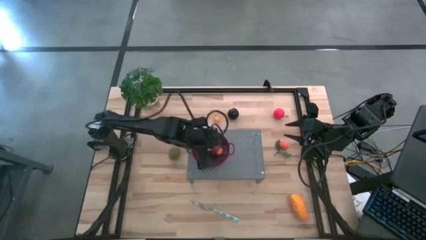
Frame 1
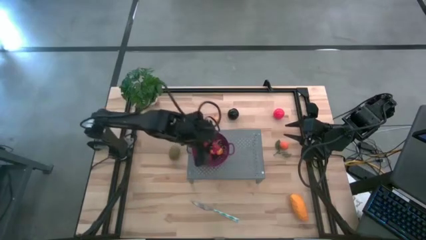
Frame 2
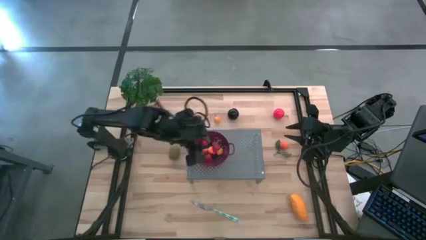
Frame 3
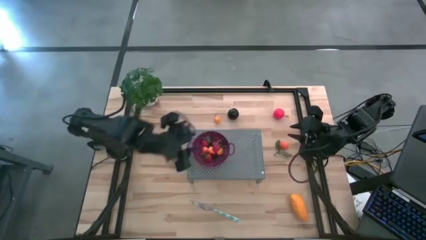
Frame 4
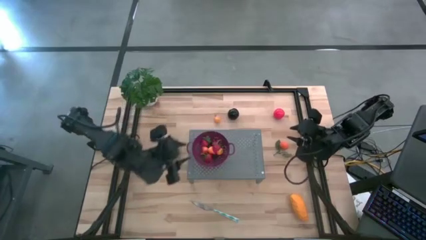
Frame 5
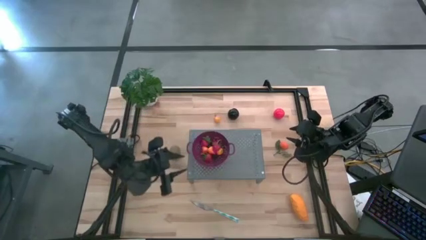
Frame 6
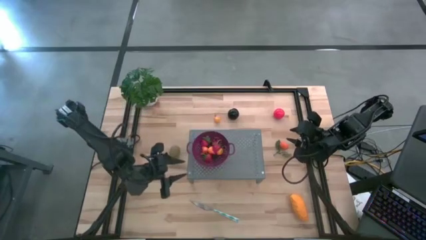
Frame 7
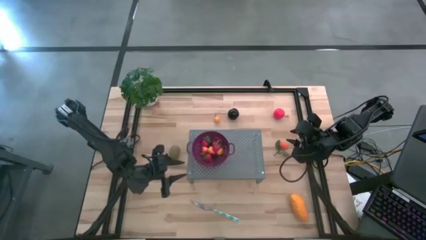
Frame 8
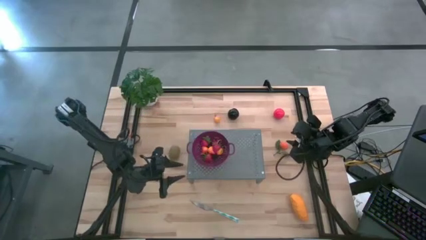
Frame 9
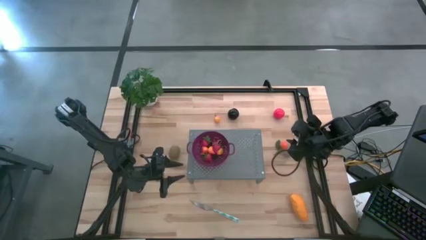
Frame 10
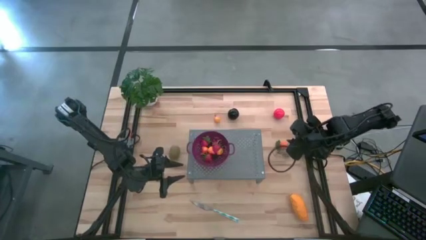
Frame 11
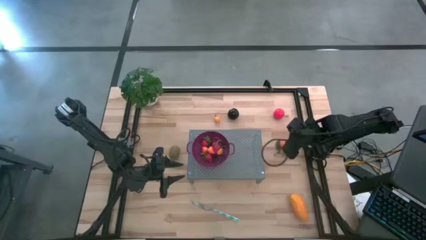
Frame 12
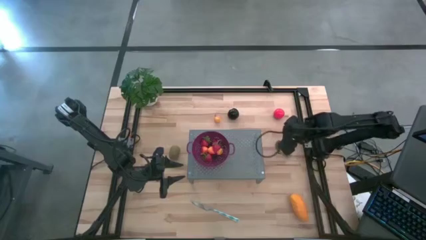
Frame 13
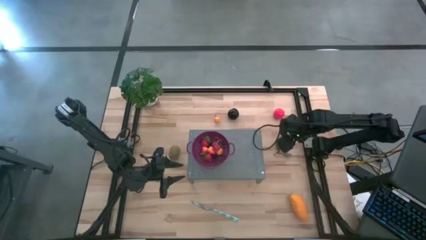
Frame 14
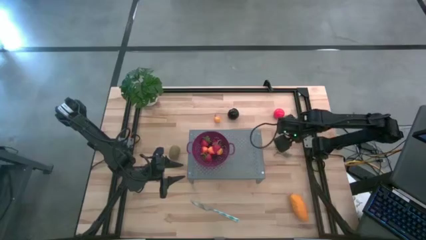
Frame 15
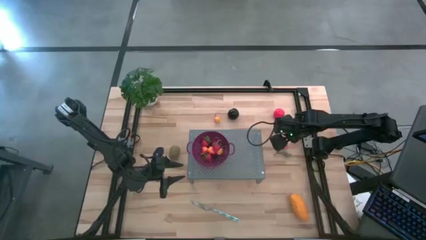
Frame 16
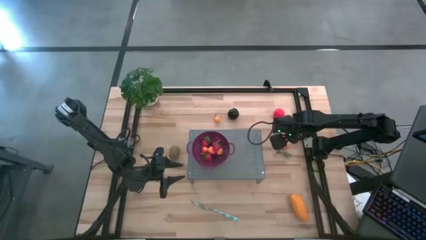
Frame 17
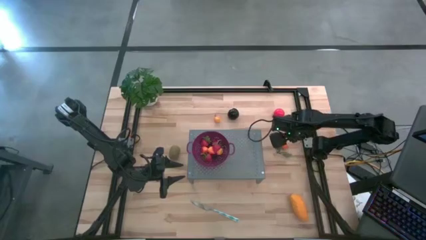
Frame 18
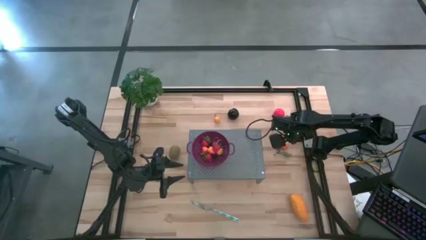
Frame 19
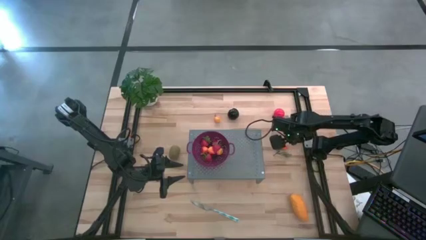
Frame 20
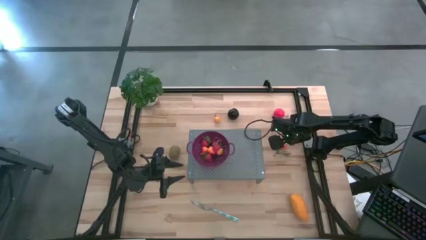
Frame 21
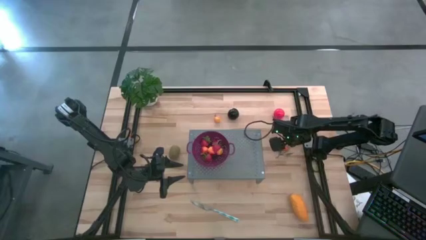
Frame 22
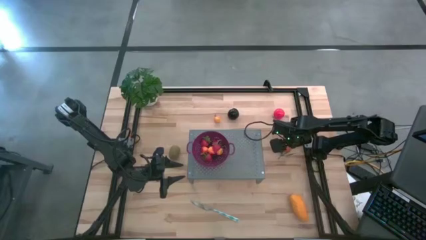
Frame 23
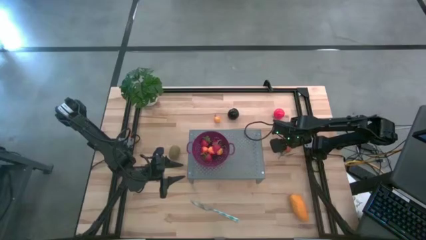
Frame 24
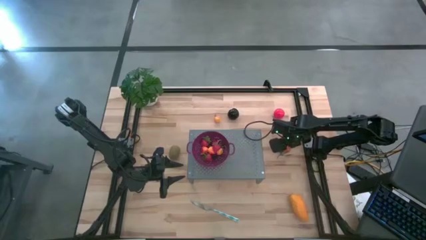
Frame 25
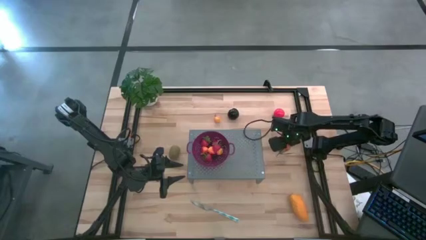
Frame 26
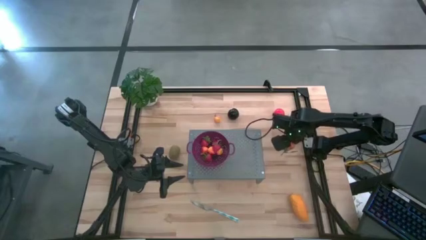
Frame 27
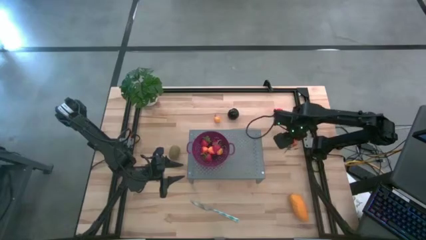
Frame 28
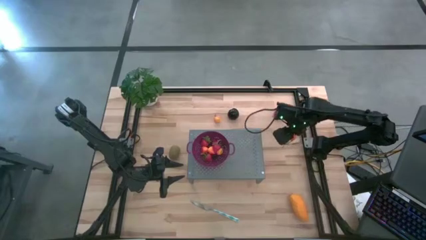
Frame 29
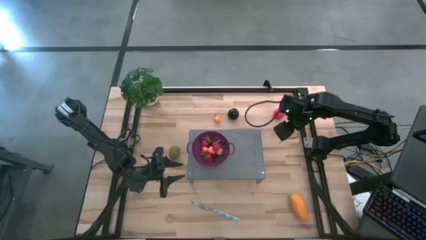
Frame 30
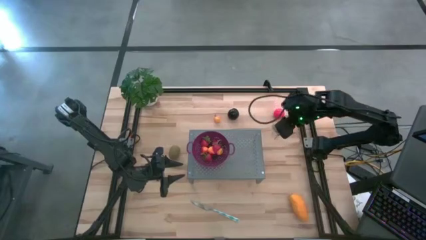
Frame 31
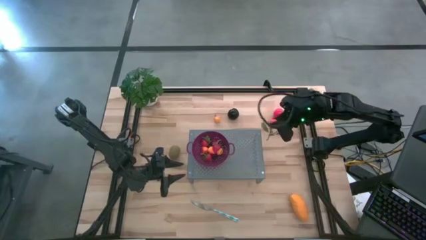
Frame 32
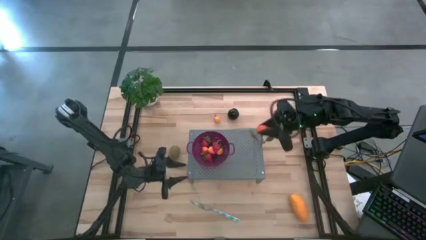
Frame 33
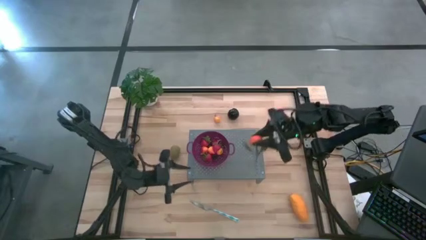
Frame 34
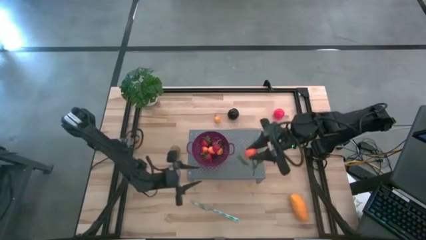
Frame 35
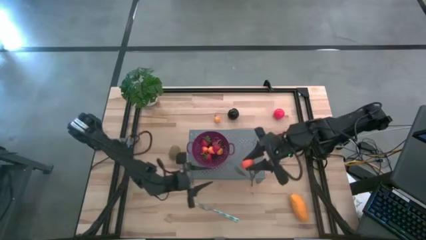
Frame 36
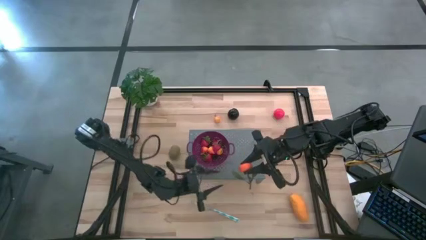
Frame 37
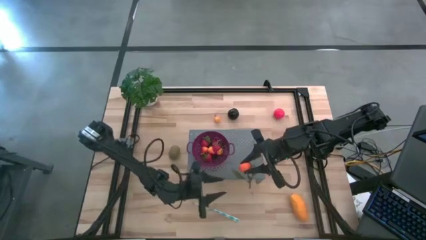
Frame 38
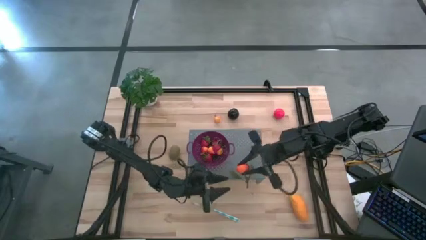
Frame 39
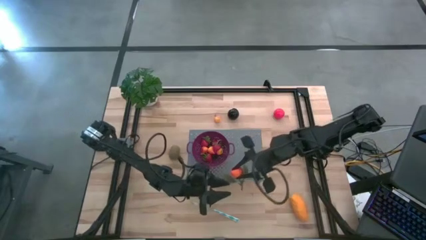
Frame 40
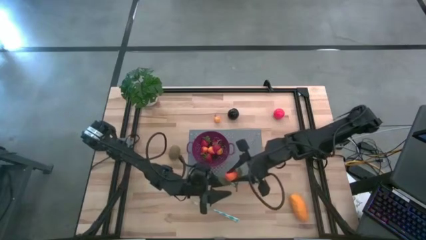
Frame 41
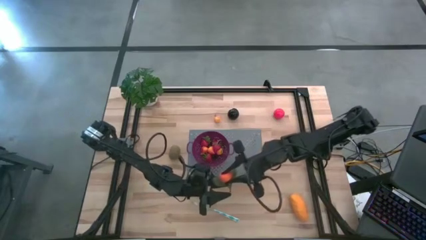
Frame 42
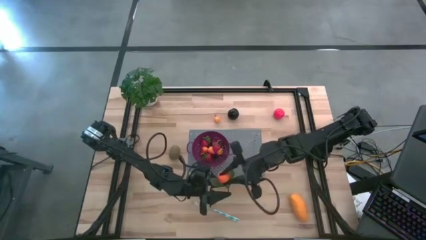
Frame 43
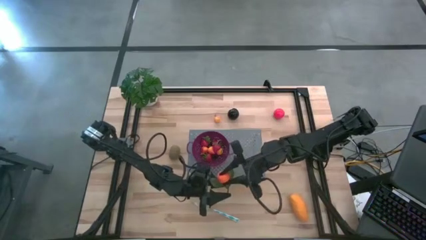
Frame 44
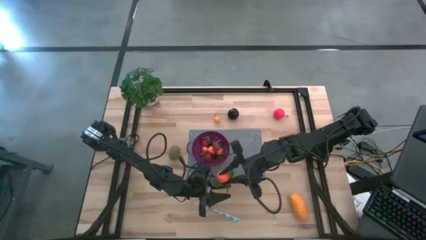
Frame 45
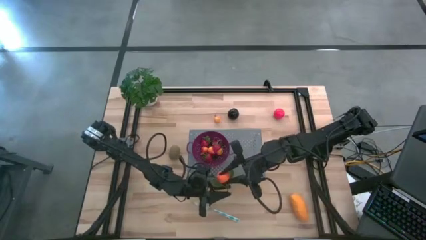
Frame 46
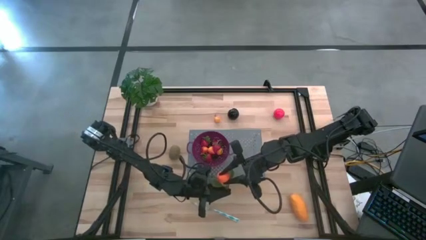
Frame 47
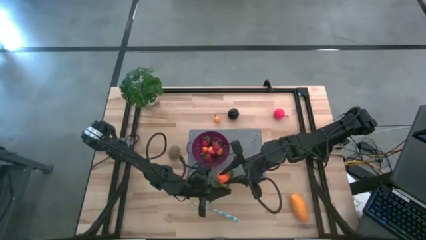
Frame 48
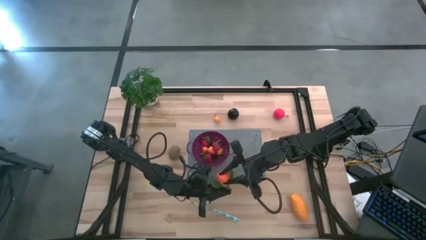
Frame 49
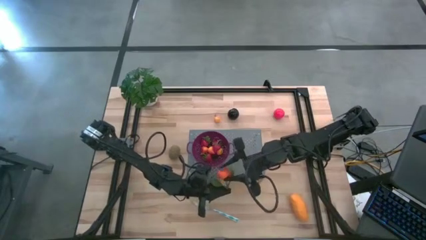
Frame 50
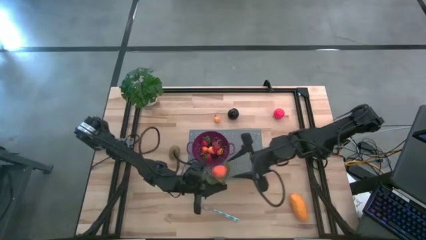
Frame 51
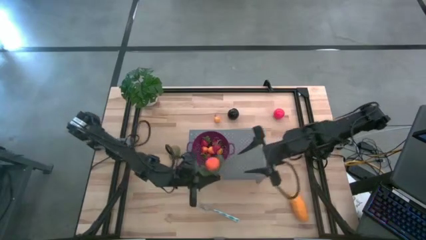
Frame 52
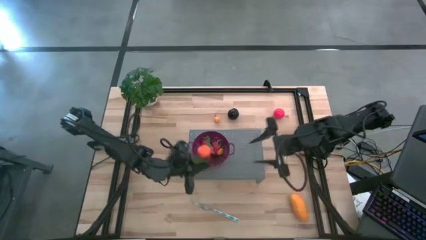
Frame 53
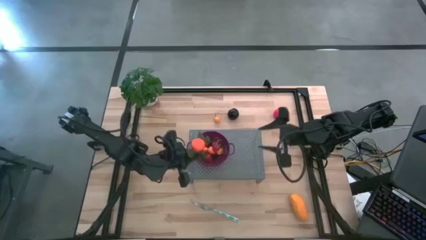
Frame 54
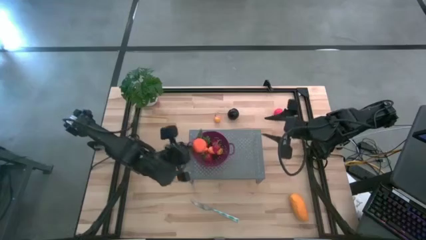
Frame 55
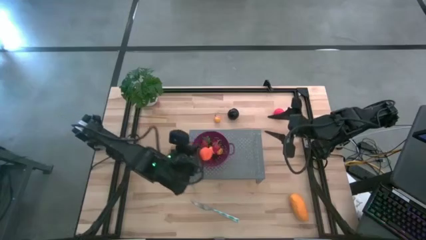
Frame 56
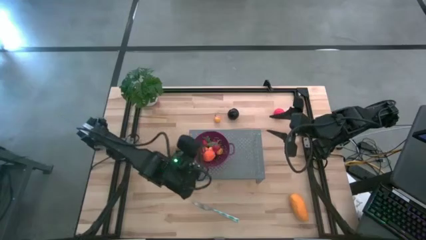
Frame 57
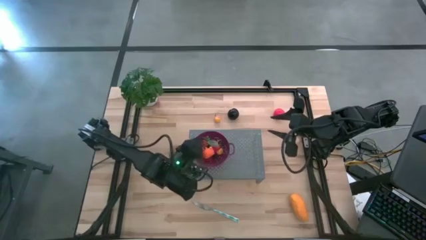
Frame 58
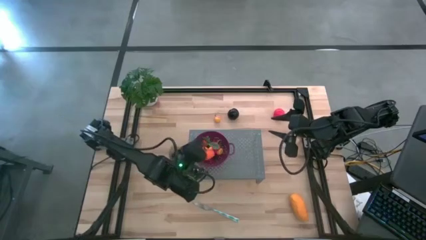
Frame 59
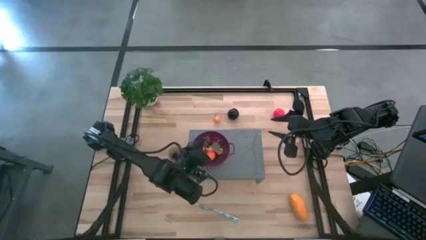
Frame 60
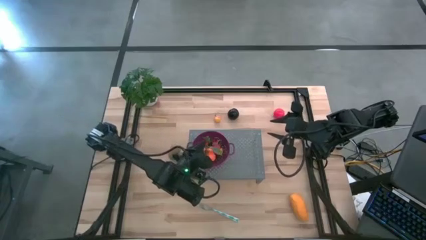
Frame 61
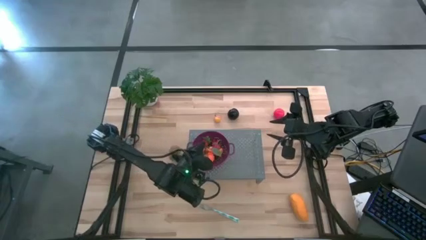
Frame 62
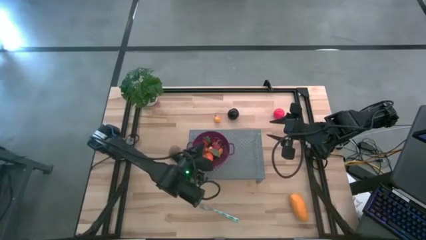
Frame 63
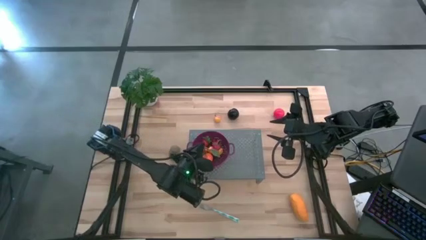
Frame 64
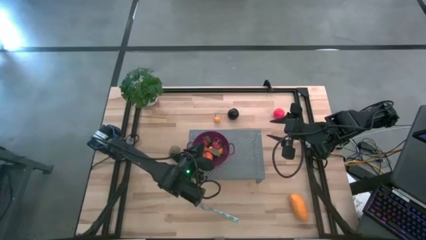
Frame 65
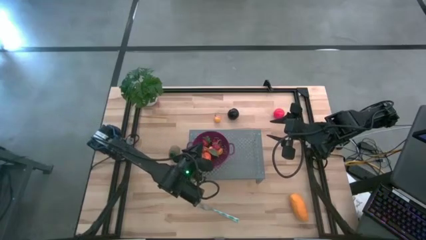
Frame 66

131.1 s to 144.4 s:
Task: Pick & Place Fruit
Put the tangerine into the purple strainer bowl

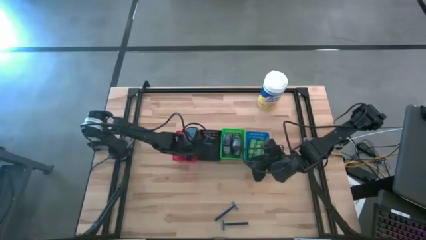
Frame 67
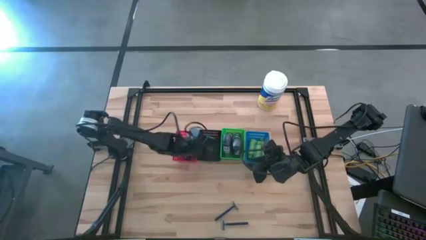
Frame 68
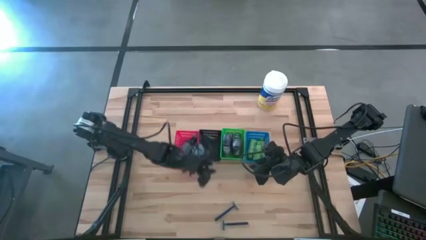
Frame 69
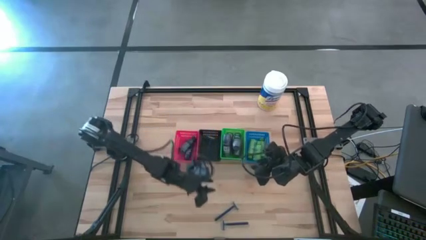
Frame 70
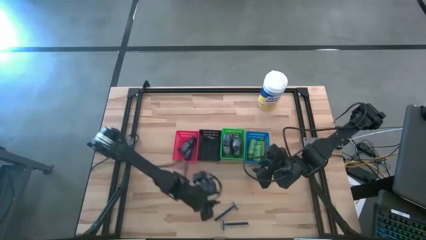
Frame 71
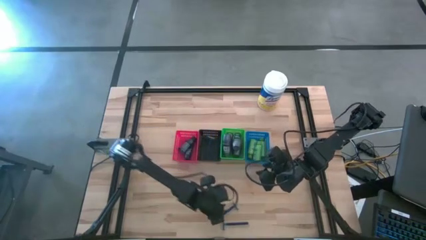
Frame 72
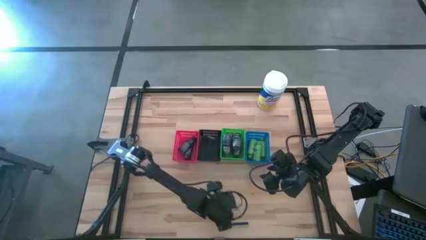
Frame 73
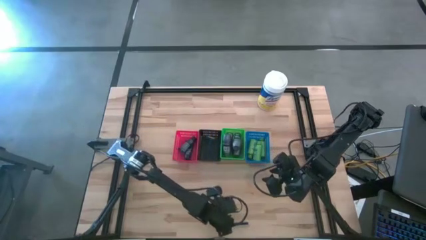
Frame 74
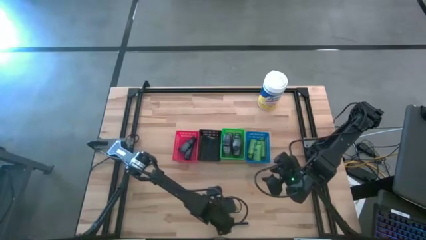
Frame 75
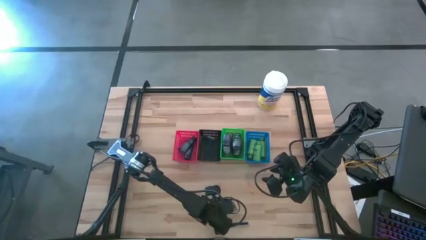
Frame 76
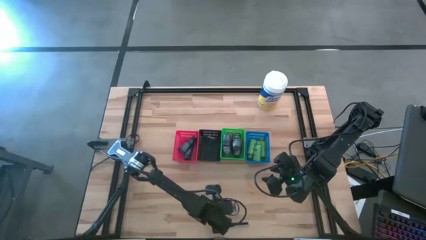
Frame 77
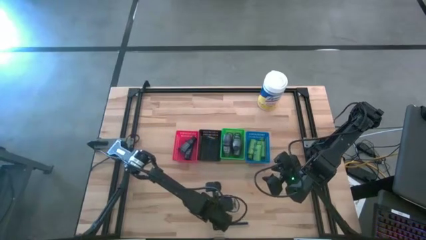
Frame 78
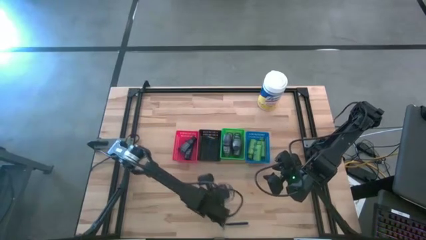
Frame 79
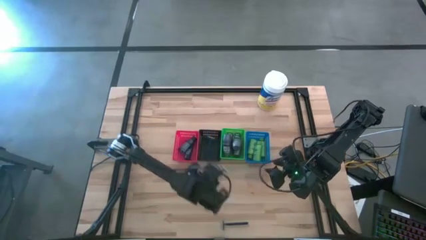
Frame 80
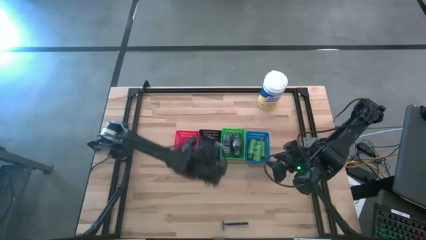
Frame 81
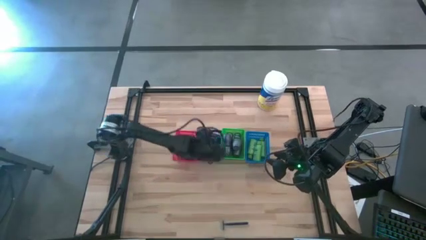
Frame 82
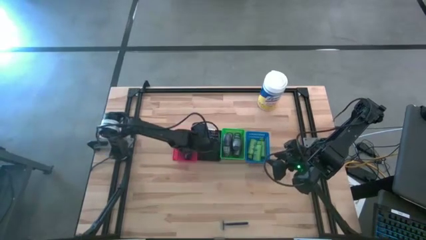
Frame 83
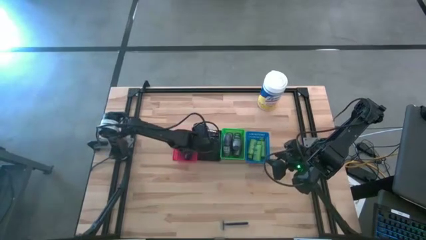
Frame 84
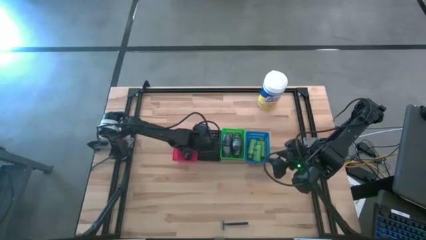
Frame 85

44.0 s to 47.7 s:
Task: Pick & Place Travel size toiletries
Put the blue razor into the black basket
